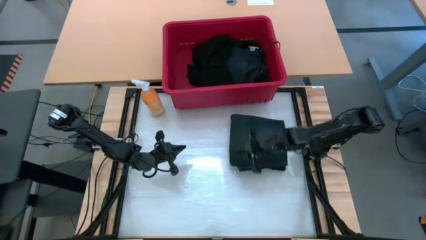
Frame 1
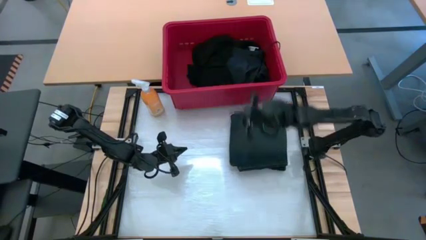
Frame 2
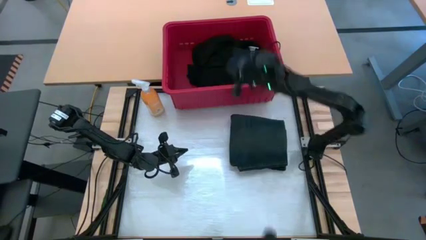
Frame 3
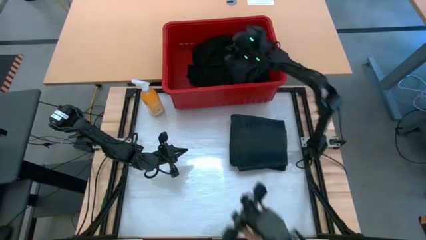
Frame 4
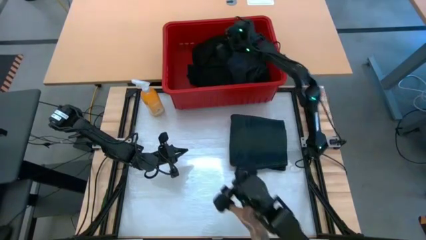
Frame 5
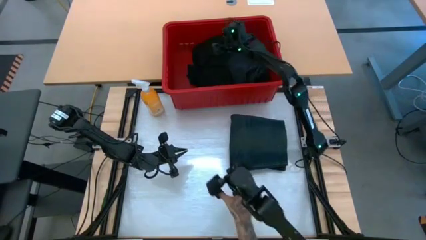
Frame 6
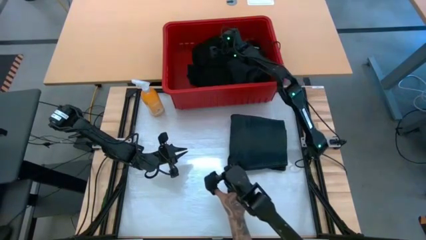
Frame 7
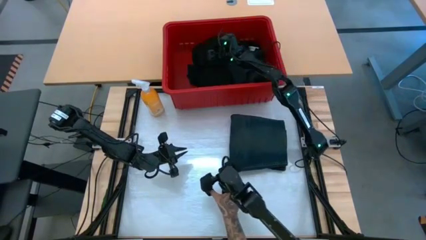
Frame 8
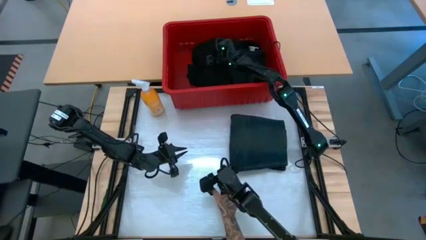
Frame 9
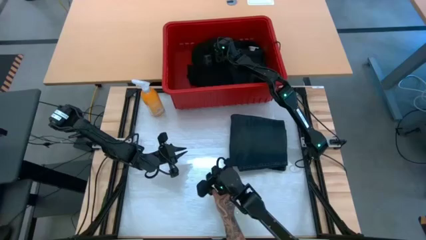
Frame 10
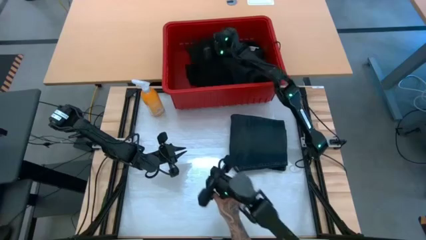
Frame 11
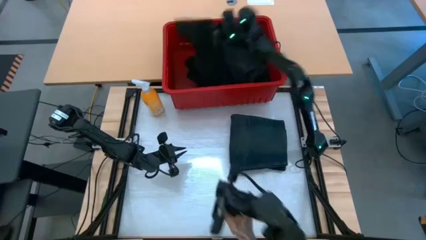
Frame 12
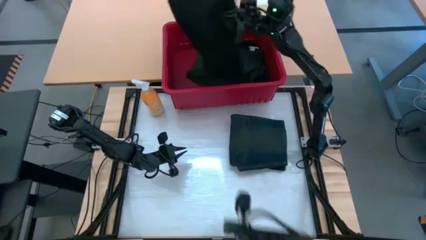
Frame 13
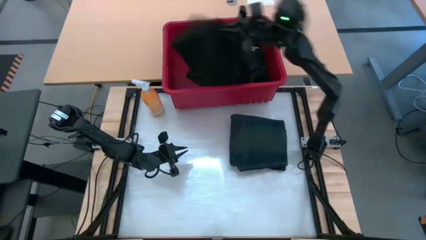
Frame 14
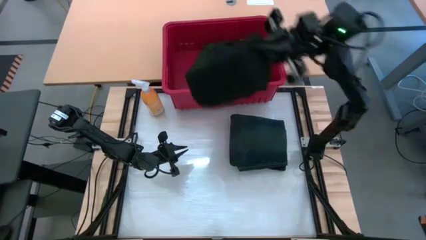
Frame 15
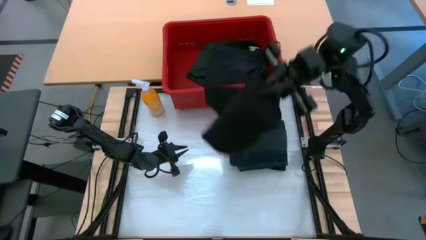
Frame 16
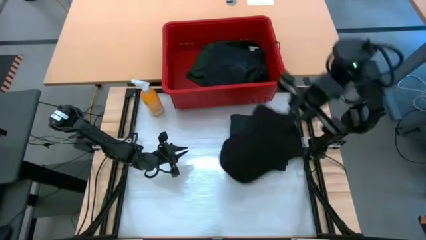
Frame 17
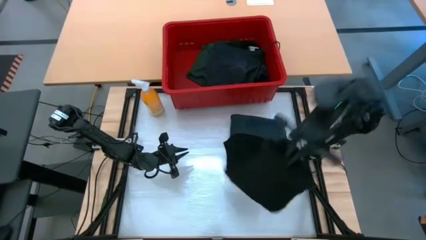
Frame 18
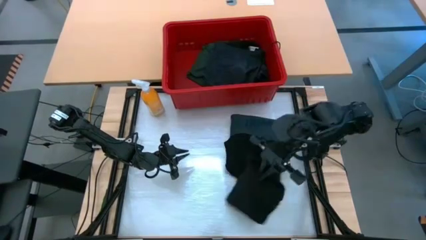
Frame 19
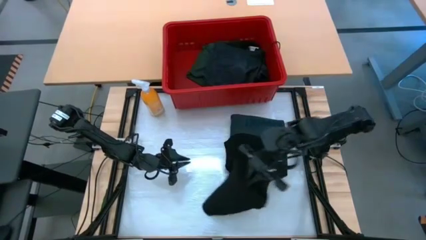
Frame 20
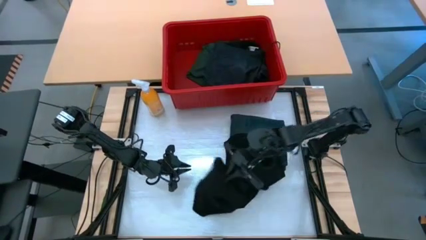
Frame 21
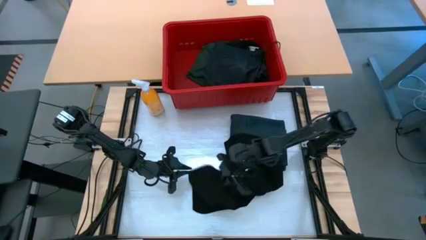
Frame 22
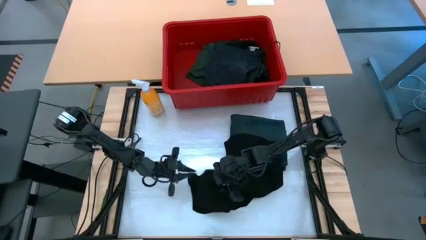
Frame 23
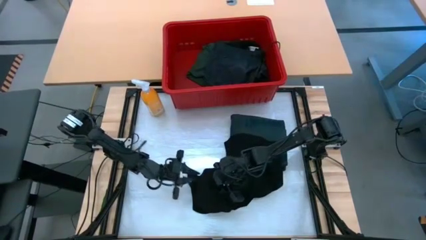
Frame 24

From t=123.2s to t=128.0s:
Task: Fold Laundry from Bin
Remove the black shirt from the red bin

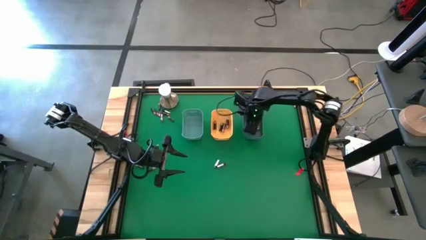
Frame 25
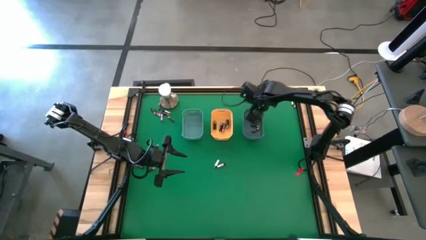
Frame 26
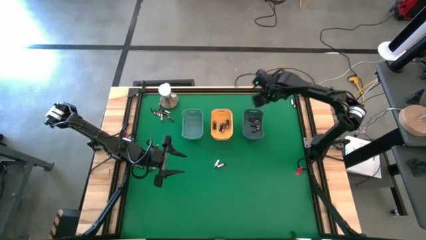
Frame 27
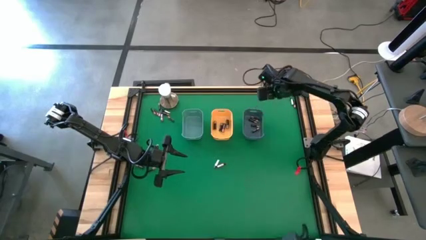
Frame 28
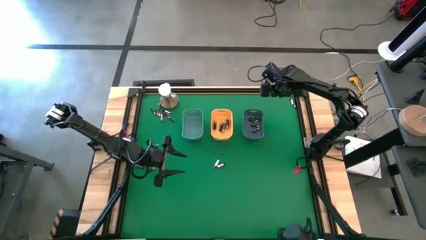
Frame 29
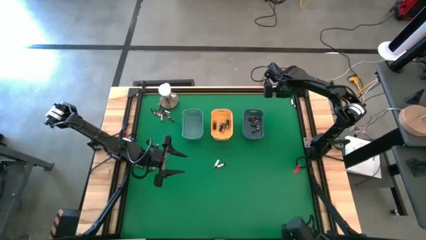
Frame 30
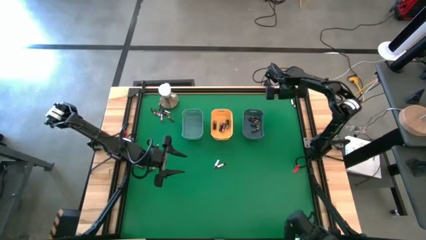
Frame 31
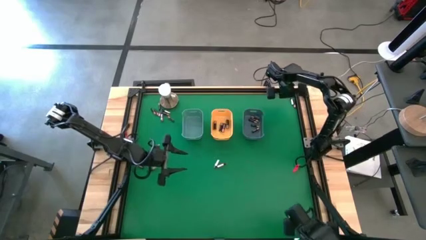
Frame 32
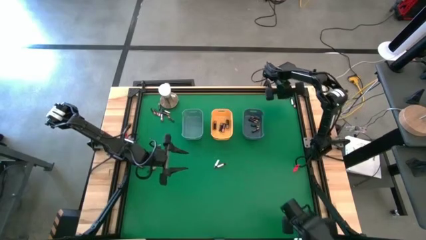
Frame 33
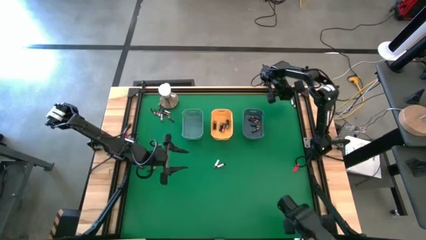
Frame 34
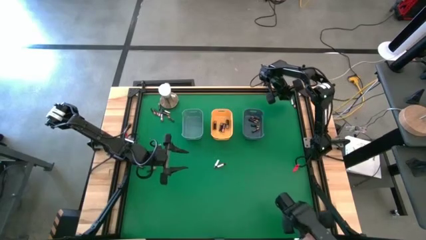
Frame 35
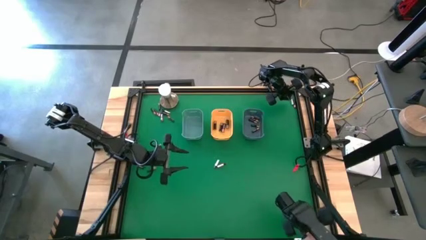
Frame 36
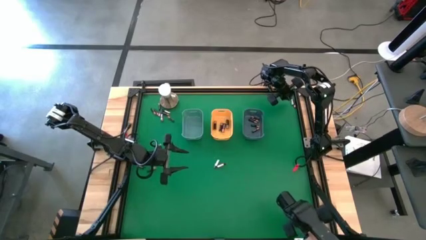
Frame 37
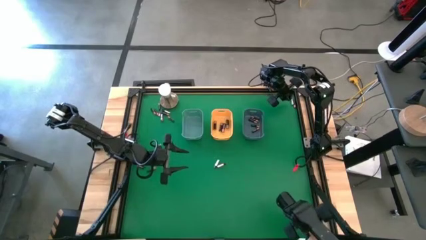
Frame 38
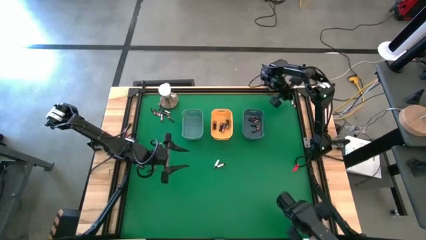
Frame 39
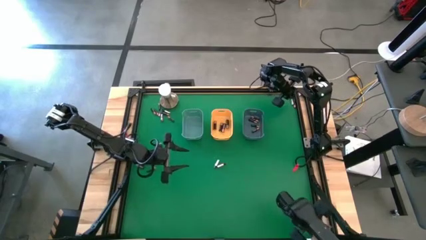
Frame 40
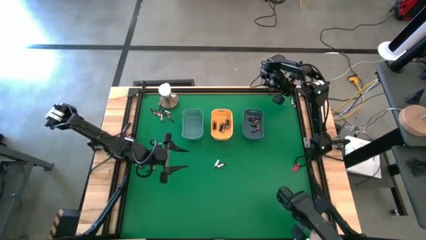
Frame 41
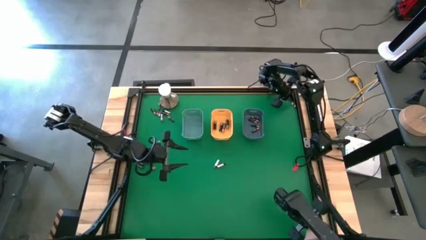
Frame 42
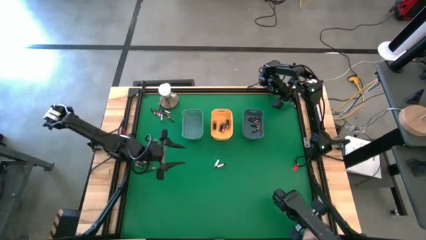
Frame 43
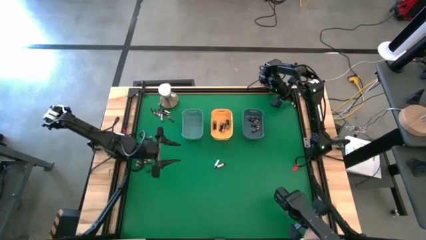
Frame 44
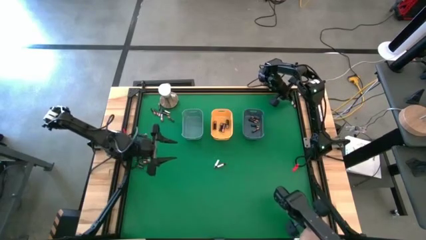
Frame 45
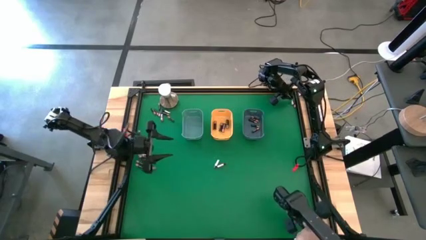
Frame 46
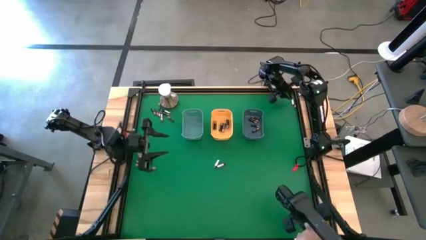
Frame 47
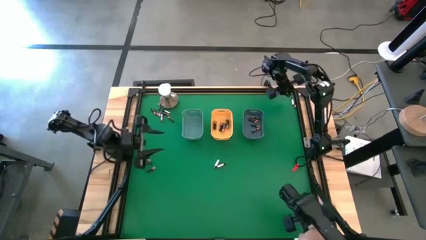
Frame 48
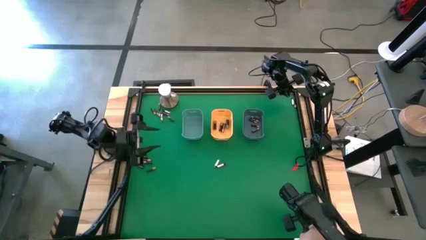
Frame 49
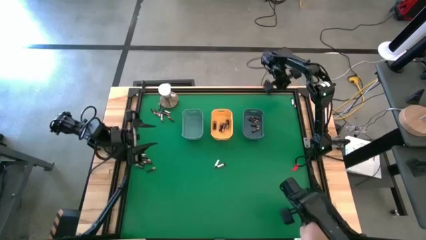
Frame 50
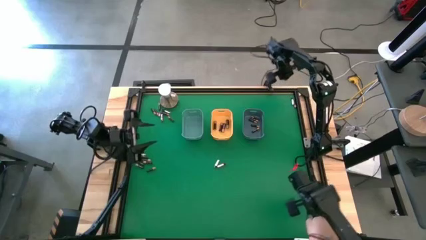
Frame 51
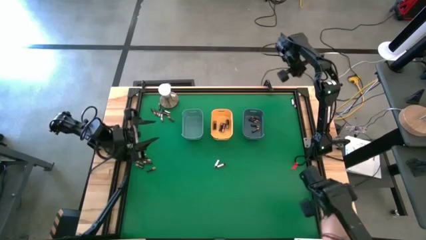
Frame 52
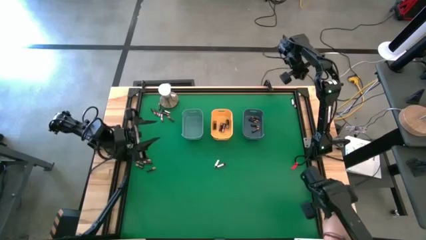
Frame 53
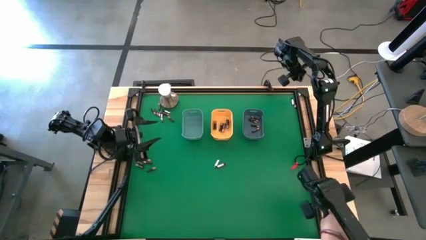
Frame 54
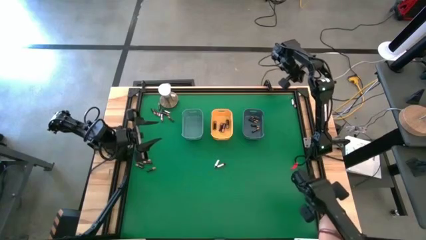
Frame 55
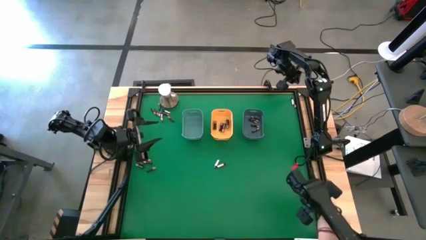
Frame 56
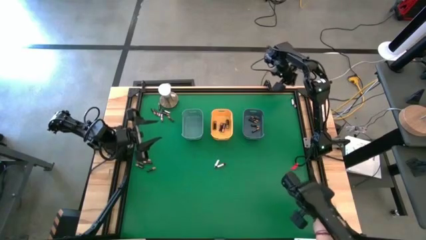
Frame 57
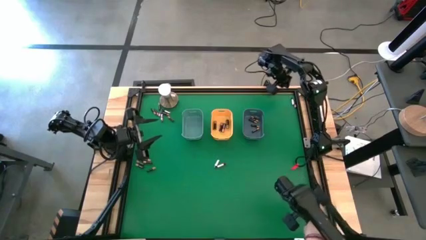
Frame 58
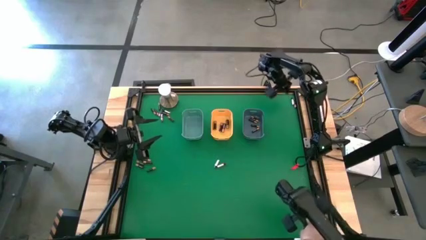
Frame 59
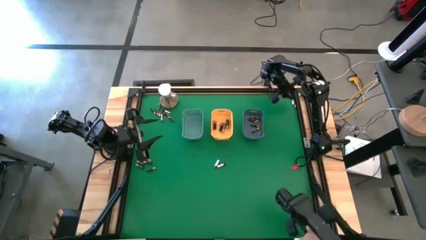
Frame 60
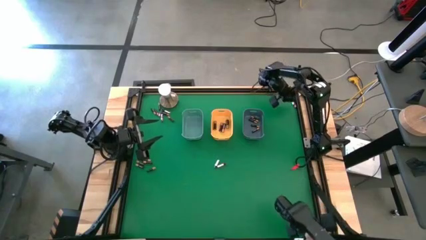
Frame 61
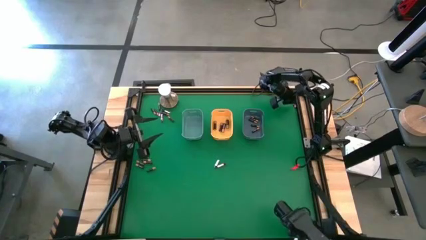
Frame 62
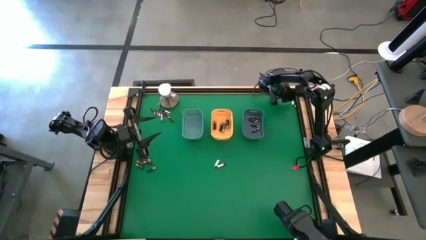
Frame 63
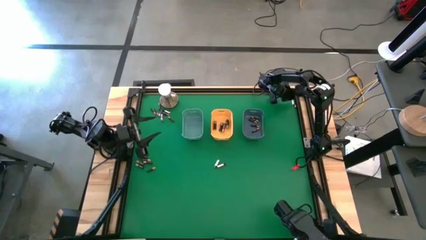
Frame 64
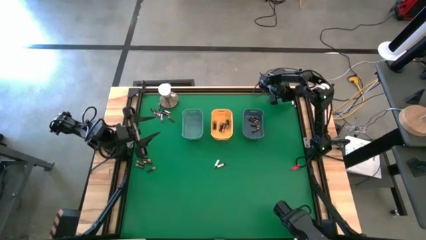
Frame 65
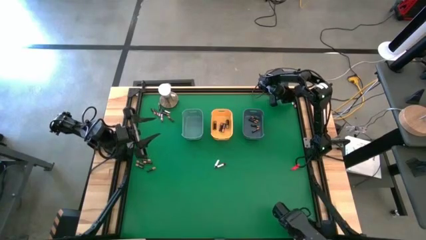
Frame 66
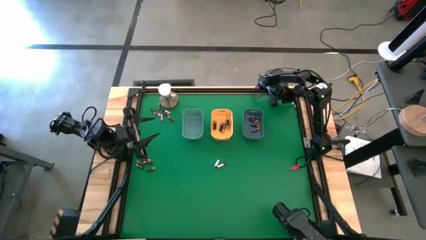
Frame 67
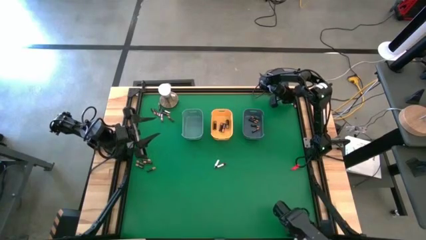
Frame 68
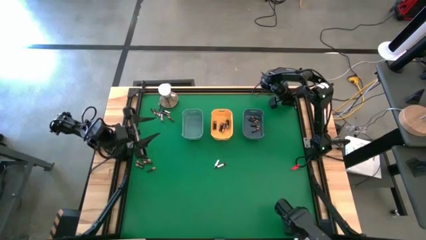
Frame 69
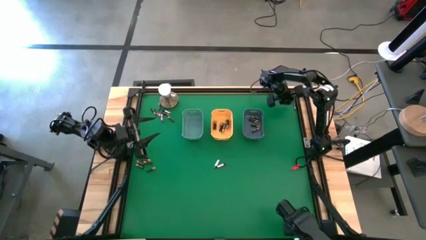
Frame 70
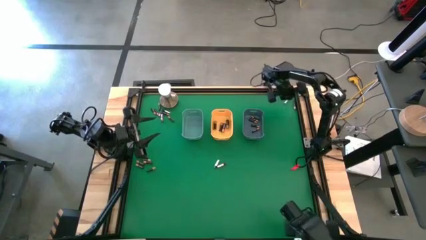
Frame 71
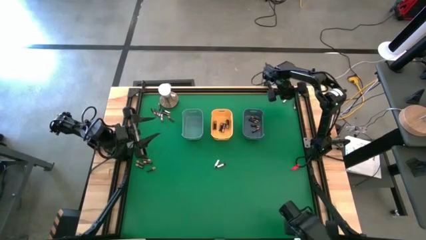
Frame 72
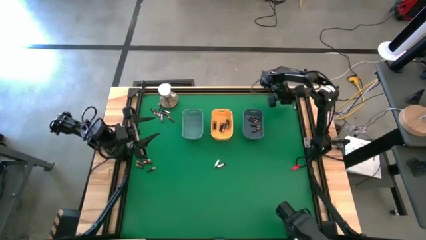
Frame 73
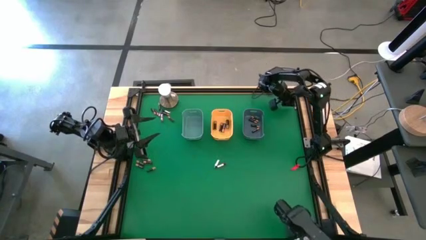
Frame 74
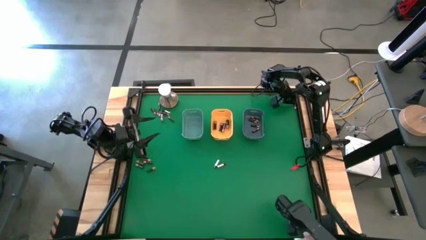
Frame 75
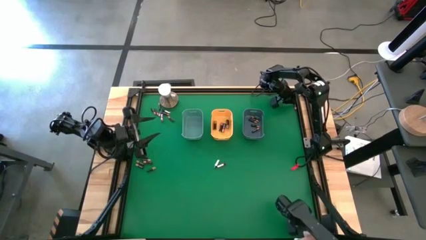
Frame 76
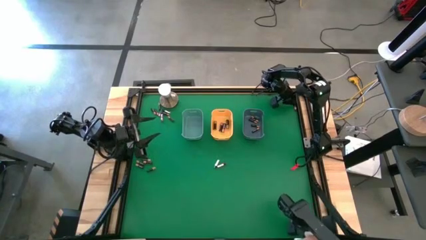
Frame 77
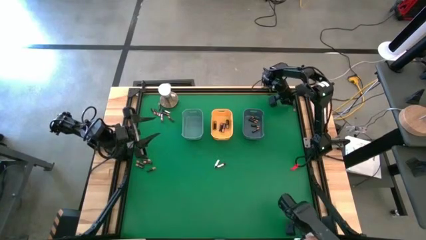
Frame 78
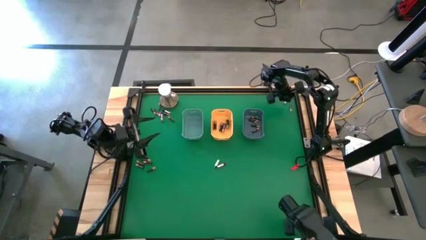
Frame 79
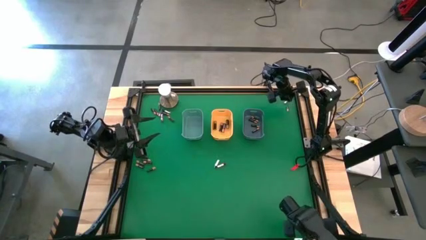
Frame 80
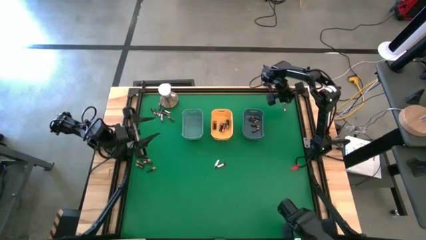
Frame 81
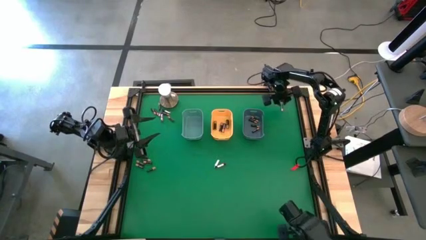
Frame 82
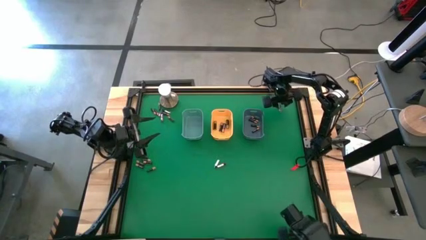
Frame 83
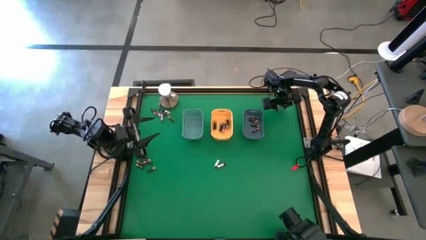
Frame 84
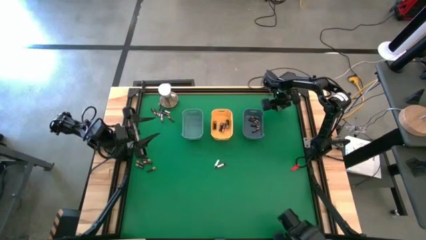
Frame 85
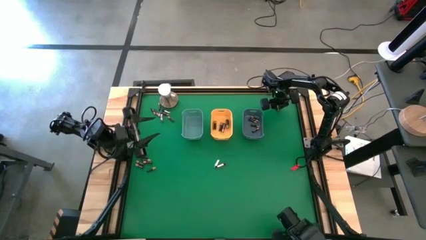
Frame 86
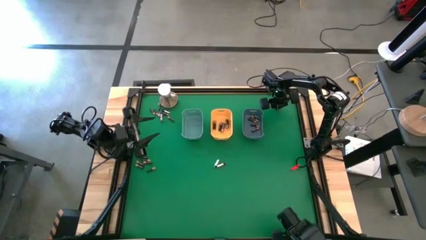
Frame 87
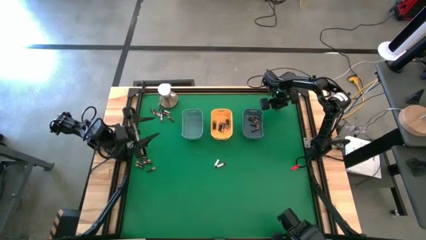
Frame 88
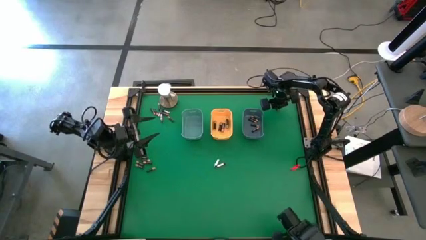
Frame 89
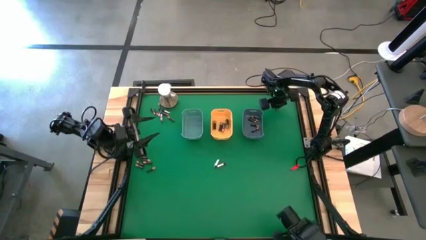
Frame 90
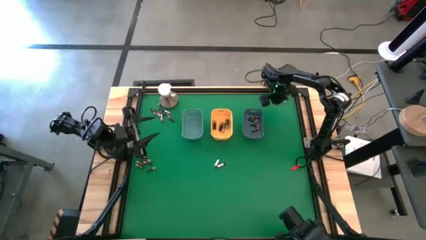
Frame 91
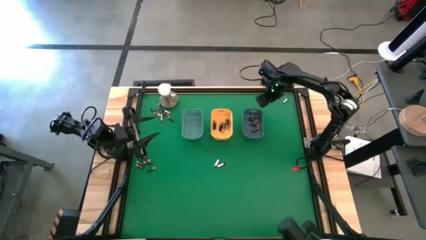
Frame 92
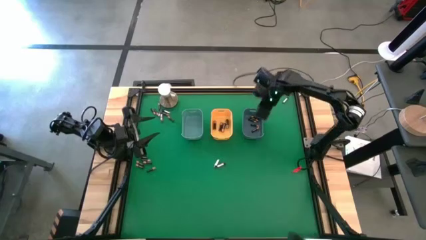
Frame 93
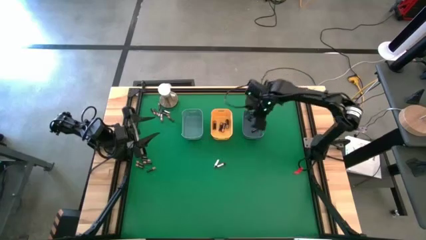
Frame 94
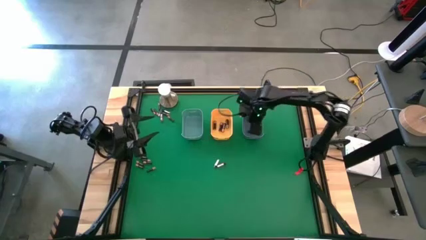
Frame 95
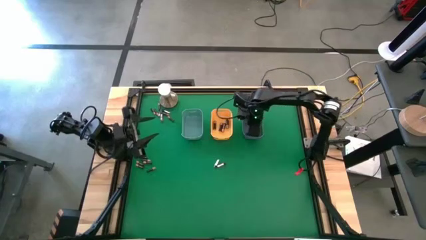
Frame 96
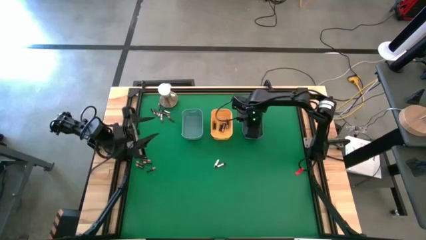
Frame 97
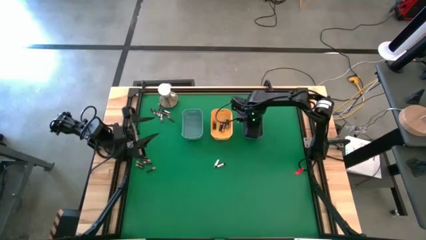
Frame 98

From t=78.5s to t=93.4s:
Task: Sort batteries
Put the small black battery into the blue bin
